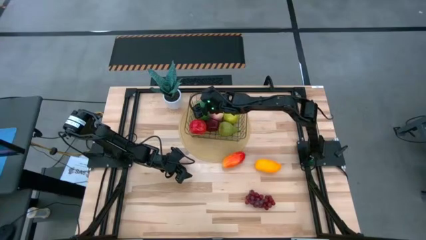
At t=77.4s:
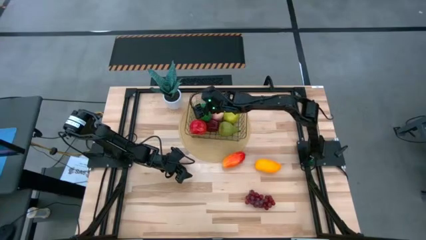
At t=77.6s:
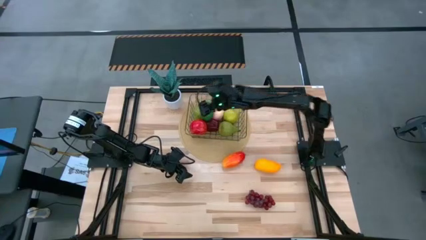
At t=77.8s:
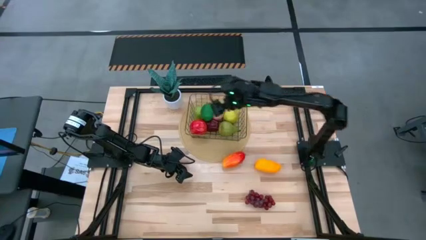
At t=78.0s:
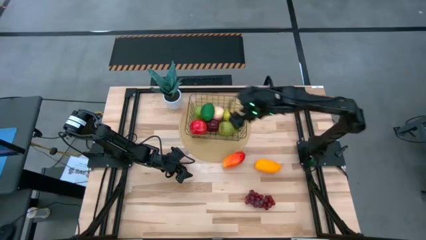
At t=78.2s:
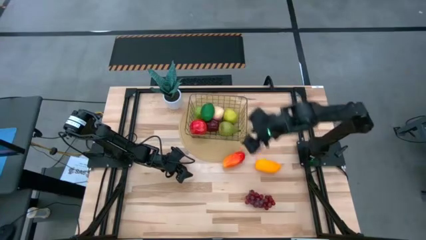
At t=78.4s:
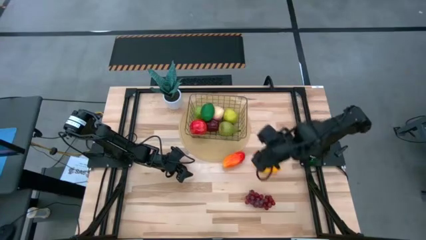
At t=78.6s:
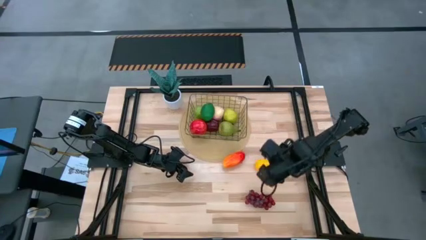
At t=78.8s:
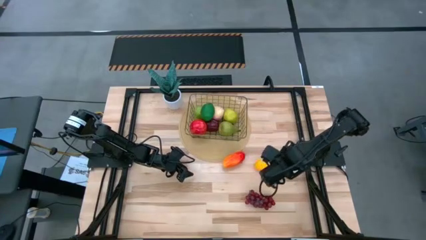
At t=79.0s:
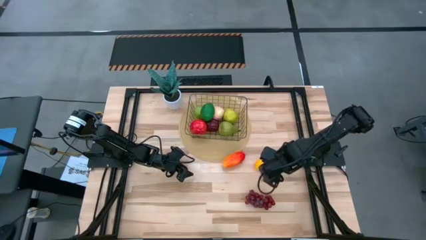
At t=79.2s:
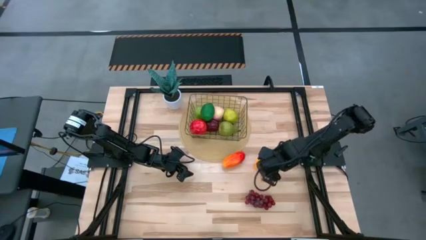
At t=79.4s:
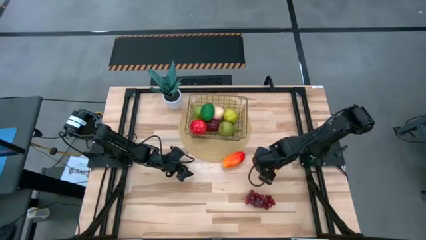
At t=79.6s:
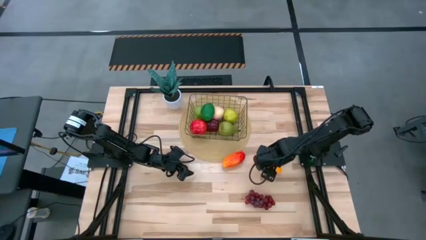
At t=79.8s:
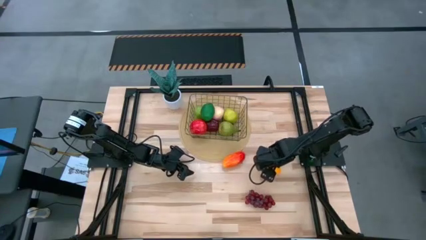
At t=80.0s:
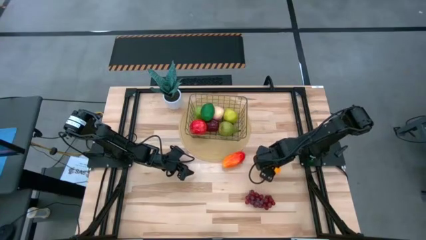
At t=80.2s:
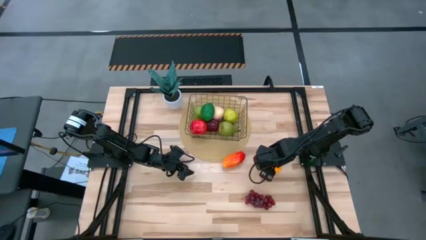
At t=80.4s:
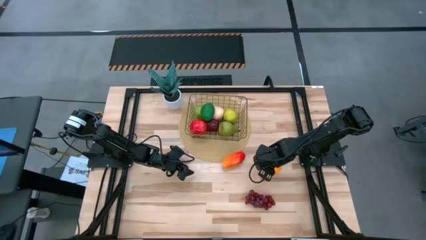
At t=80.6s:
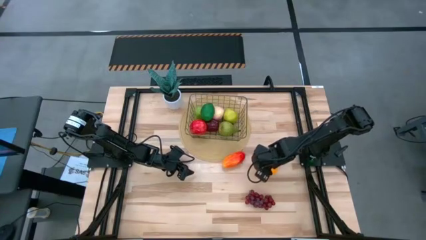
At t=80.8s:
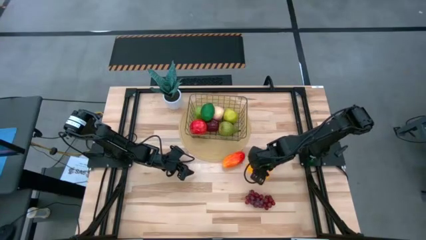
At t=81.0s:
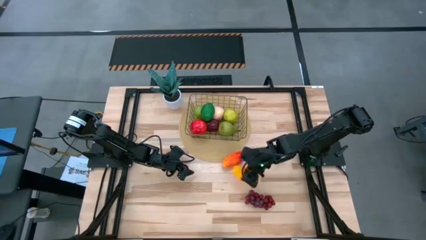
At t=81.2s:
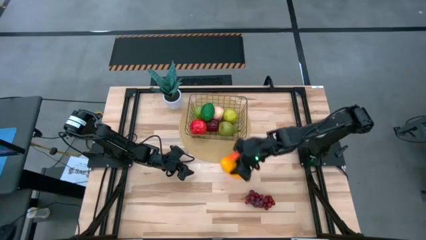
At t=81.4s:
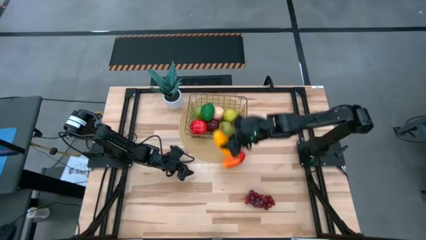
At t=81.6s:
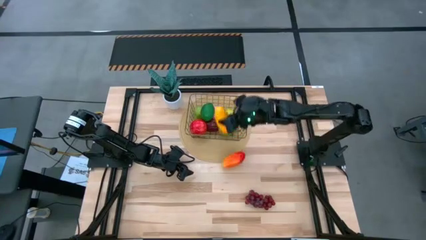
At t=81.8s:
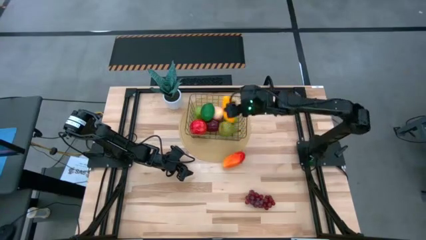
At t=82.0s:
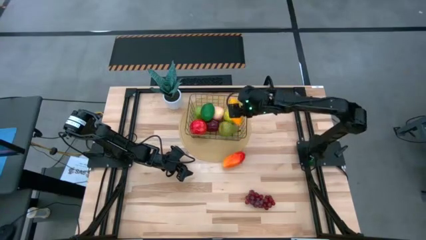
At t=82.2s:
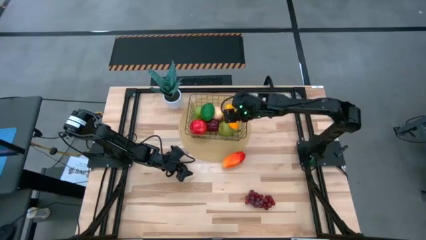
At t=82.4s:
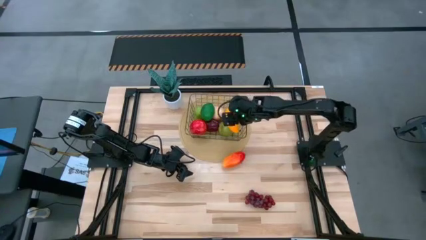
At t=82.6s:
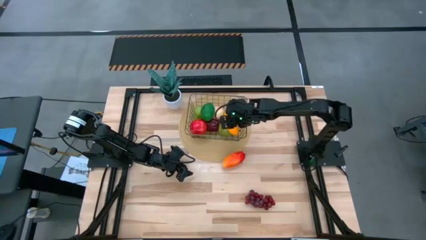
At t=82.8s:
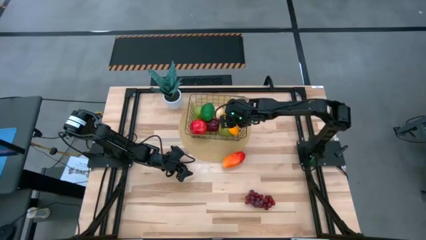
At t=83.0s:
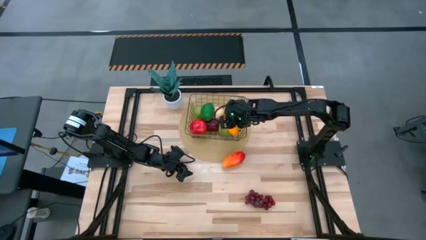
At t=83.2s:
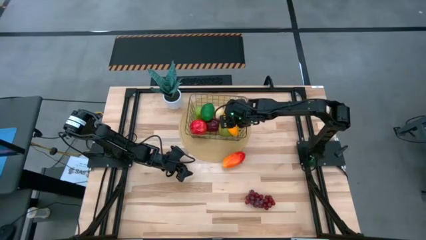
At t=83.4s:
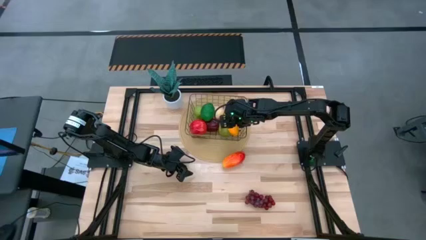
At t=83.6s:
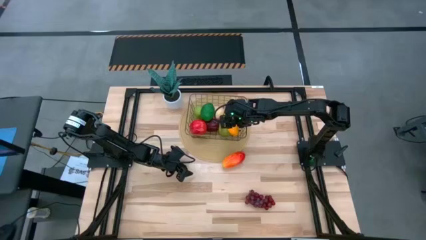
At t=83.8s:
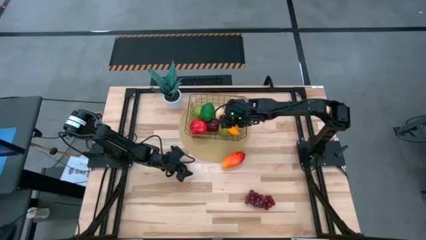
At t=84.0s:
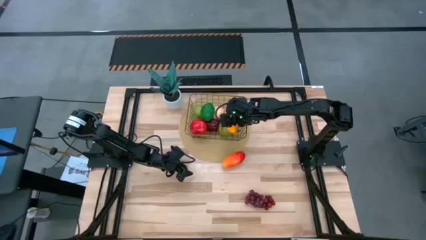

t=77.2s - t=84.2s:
Task: Build produce basket
Put the yellow mango into the wire basket

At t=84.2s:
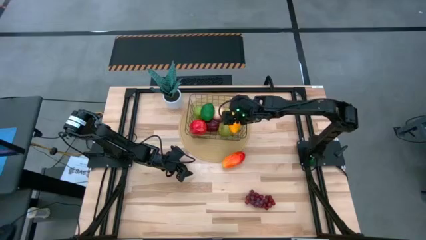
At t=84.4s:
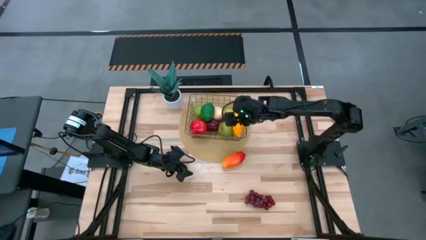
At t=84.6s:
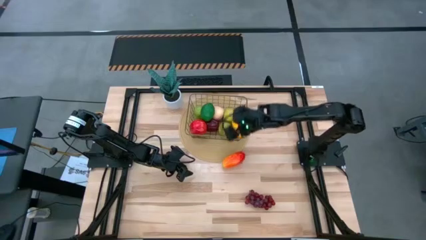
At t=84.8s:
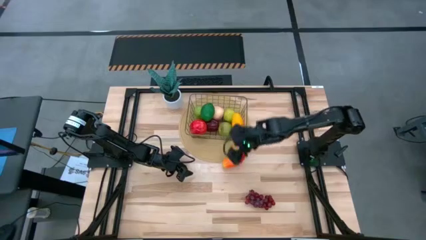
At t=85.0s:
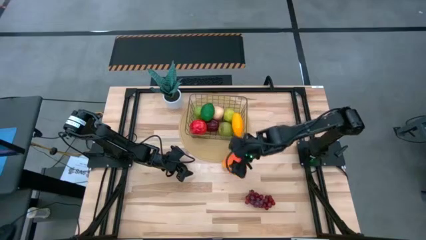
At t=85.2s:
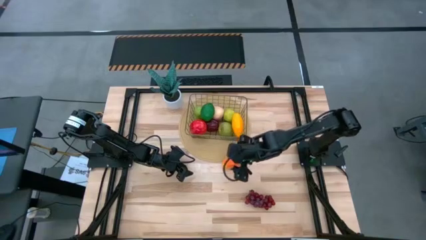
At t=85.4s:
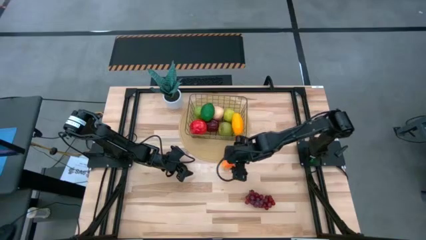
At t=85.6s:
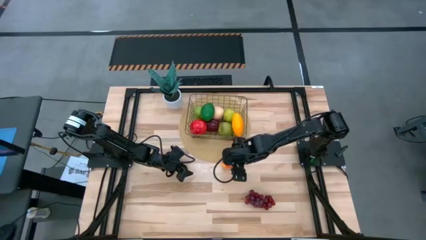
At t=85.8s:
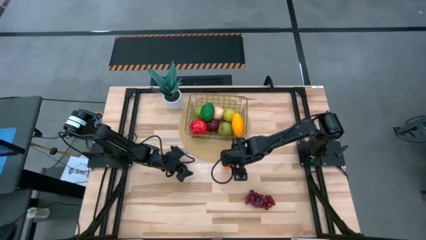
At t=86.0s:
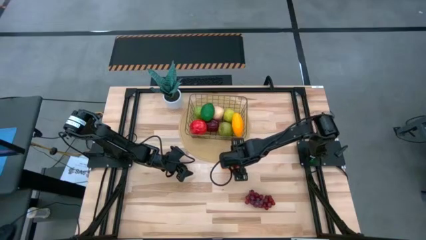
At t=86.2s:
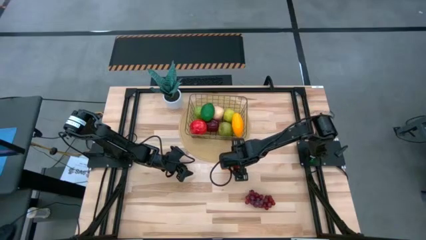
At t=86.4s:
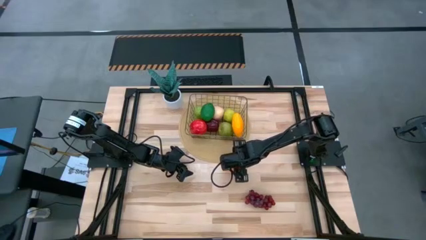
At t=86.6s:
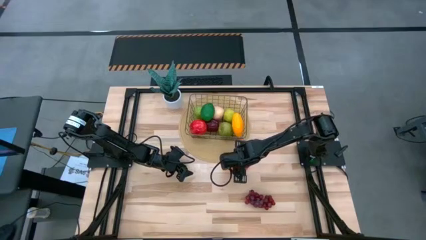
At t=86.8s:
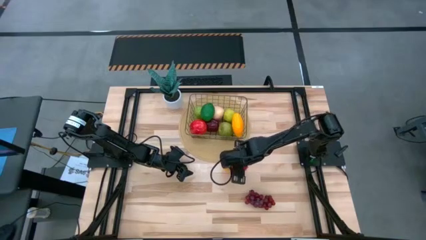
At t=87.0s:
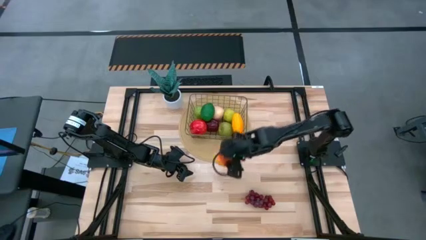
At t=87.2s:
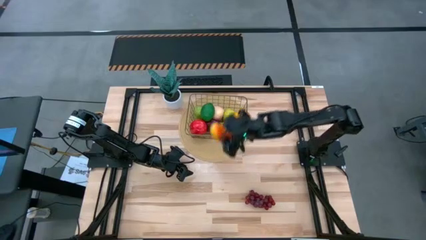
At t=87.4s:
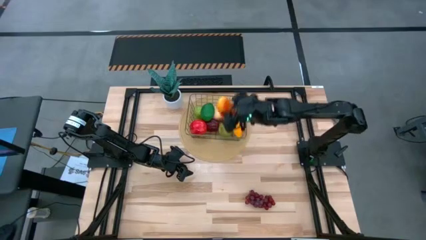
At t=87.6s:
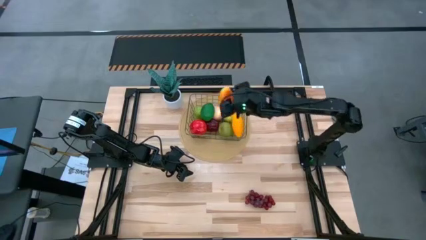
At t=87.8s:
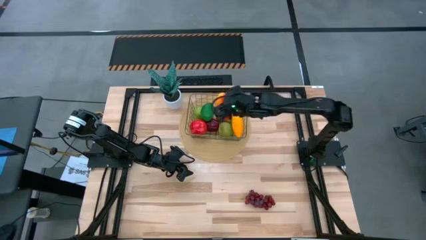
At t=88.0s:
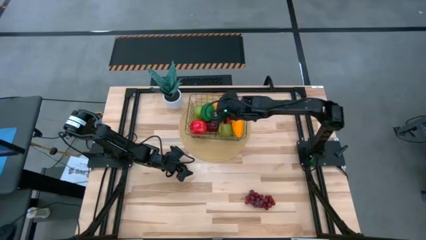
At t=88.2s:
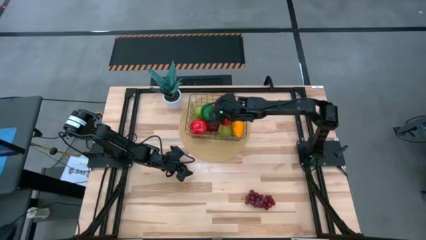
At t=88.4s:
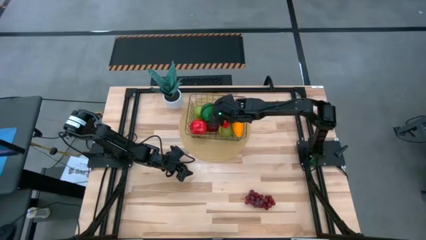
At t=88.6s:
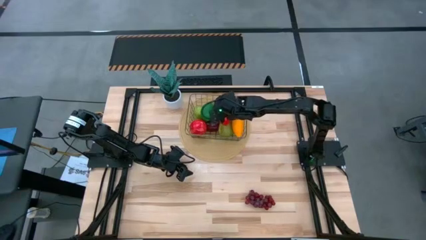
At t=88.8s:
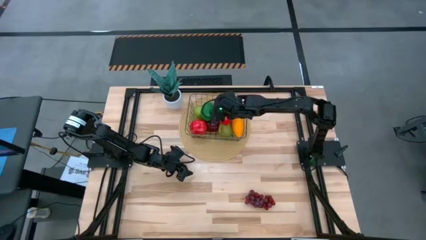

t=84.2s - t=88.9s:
Put the orange mango into the wire basket

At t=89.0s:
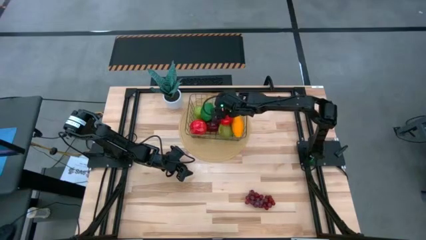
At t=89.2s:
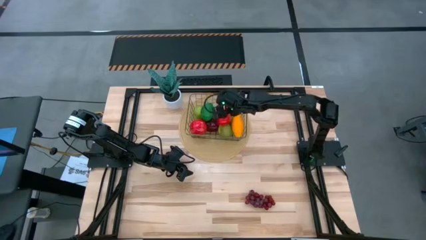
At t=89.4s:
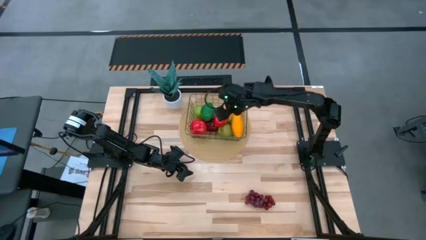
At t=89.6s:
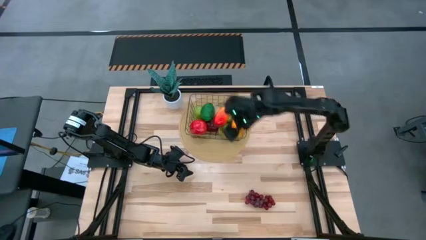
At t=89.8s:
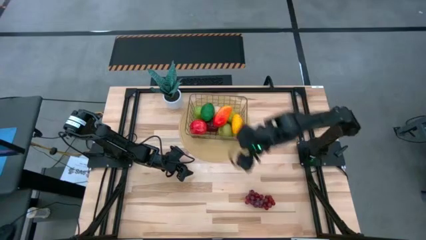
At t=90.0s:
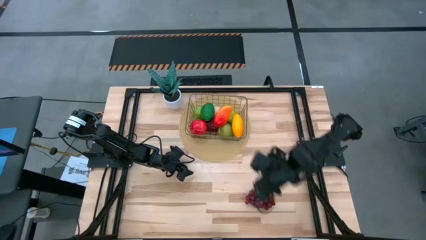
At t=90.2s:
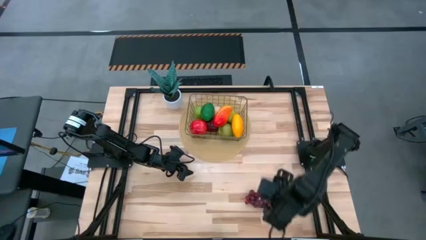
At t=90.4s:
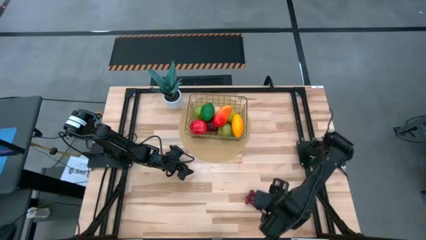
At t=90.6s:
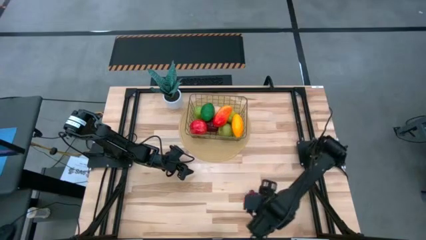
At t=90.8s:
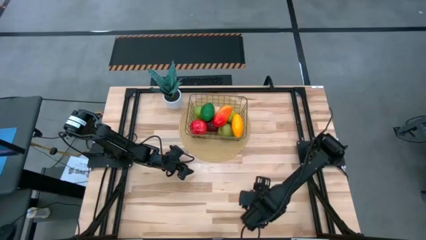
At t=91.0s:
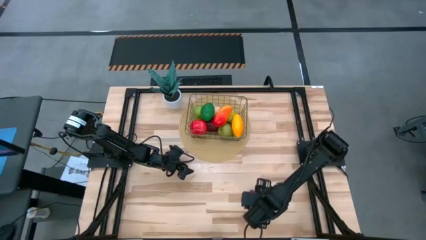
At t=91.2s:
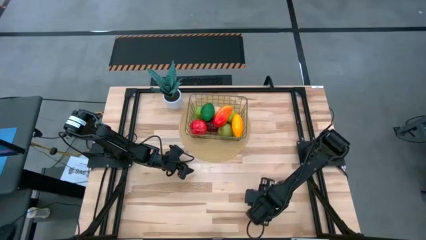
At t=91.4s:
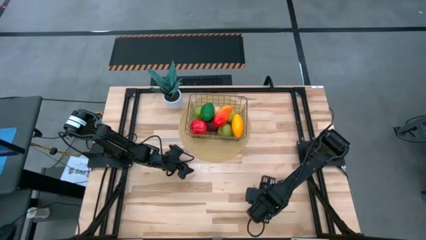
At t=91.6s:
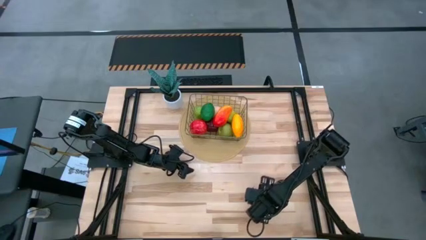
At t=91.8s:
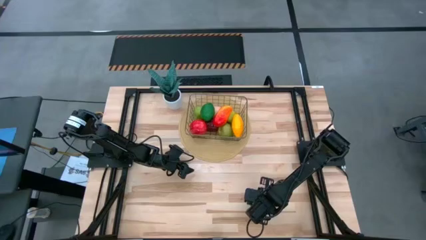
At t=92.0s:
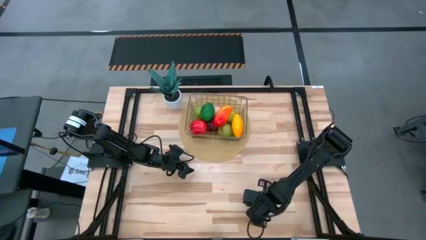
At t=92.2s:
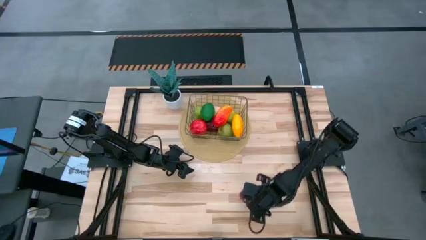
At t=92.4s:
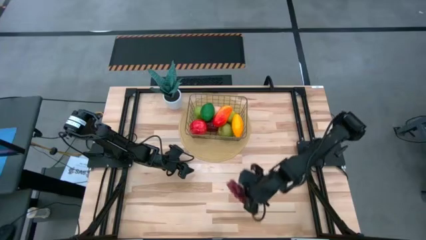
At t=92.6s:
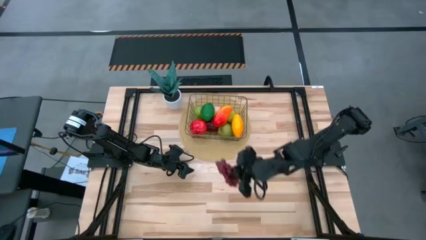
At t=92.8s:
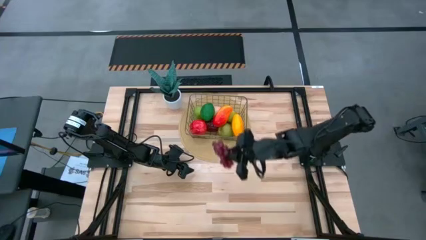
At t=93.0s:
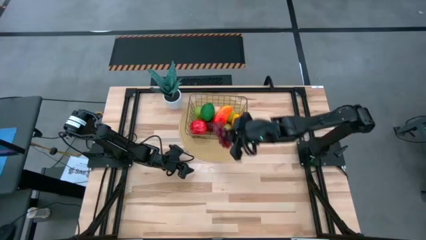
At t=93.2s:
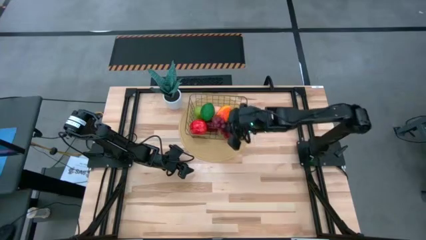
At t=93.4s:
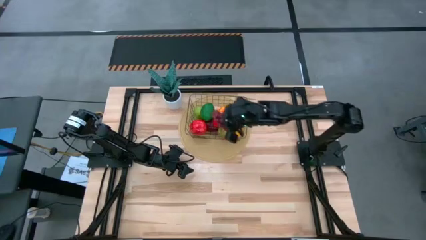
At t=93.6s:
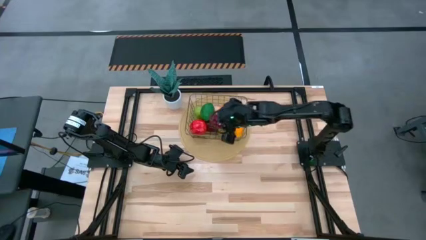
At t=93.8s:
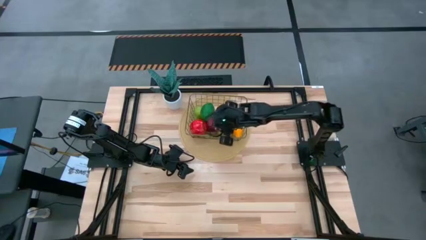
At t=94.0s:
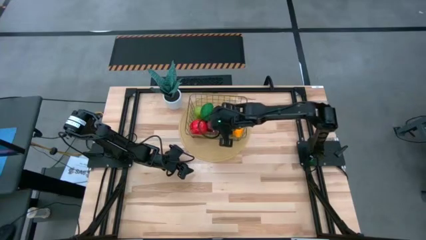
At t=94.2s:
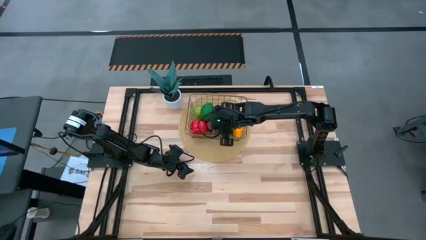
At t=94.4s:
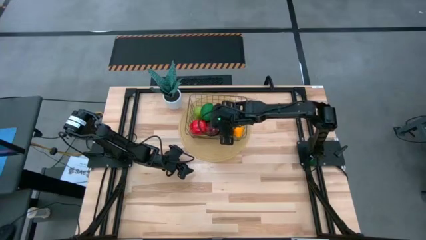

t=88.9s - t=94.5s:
Put the red grapes into the wire basket
